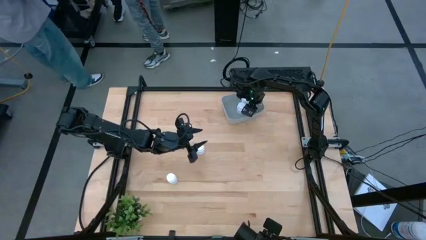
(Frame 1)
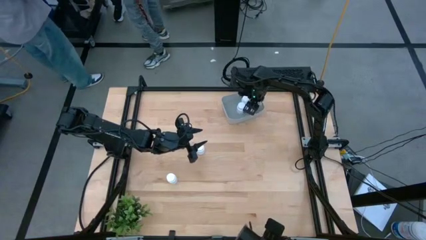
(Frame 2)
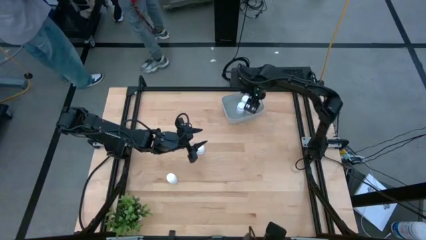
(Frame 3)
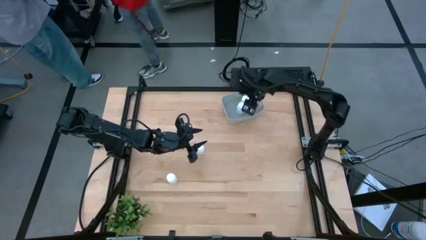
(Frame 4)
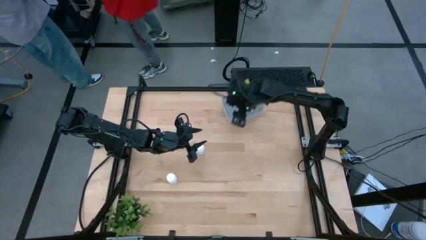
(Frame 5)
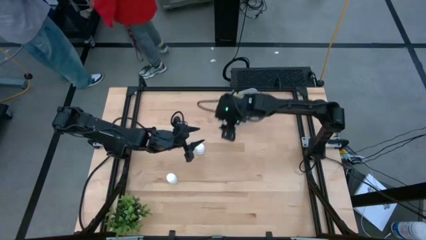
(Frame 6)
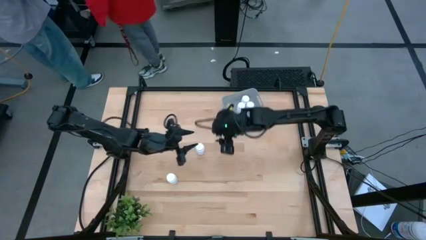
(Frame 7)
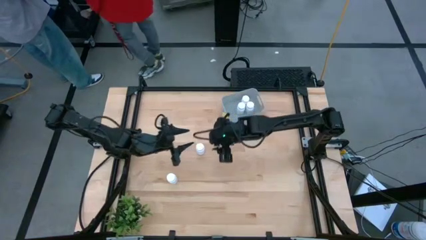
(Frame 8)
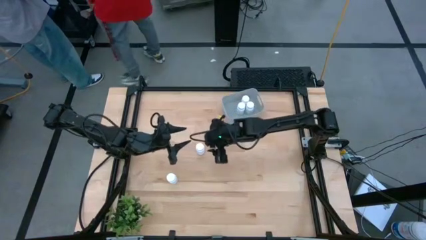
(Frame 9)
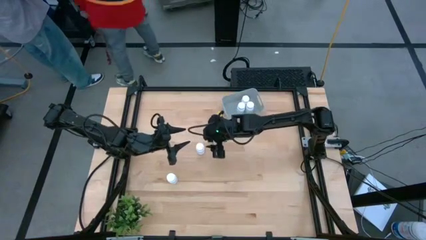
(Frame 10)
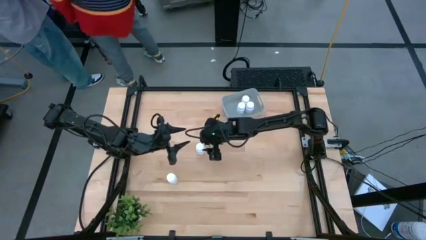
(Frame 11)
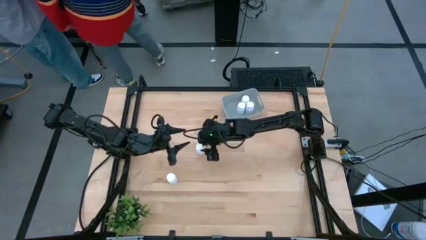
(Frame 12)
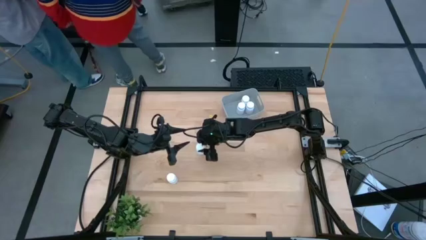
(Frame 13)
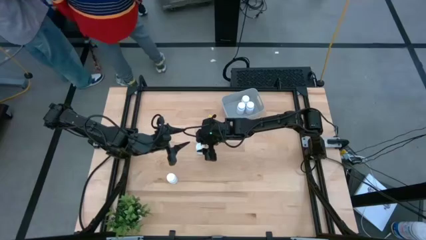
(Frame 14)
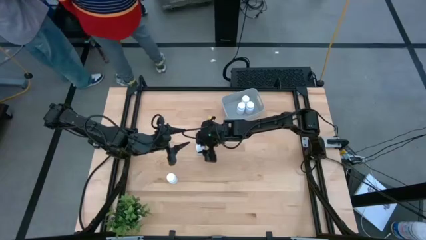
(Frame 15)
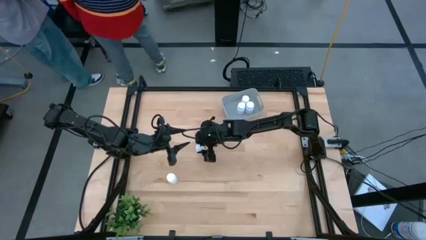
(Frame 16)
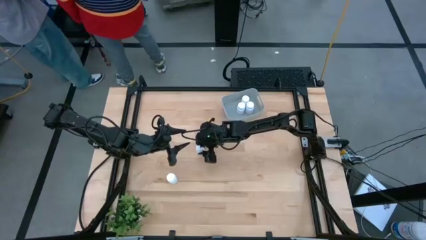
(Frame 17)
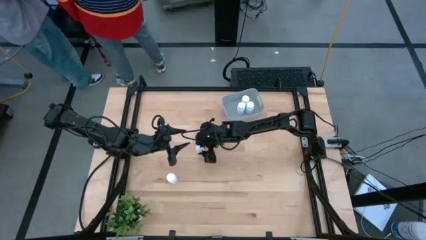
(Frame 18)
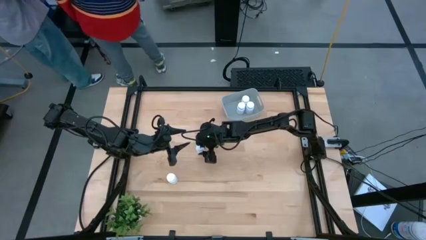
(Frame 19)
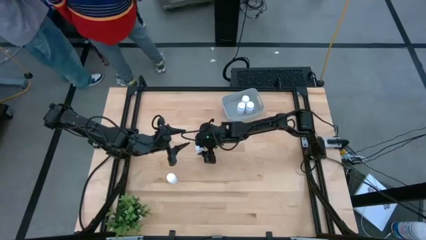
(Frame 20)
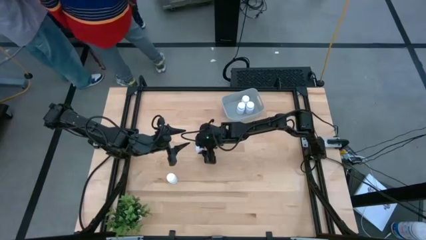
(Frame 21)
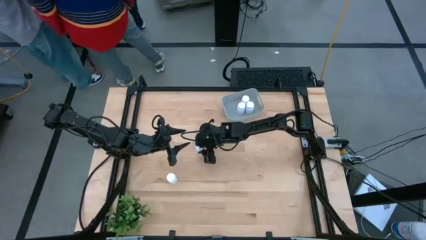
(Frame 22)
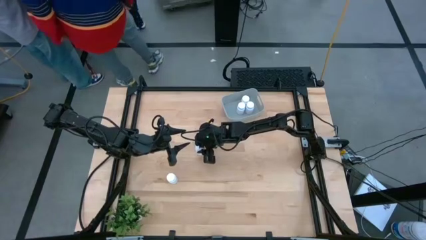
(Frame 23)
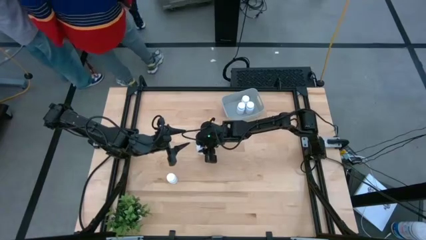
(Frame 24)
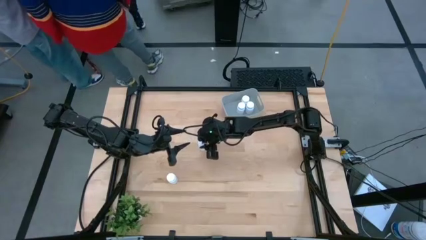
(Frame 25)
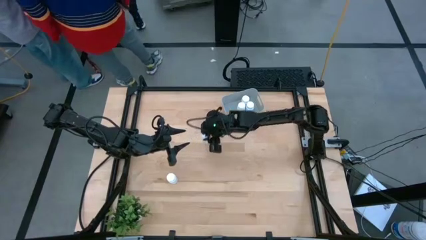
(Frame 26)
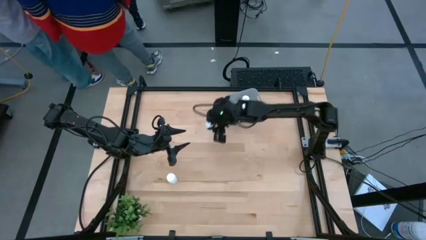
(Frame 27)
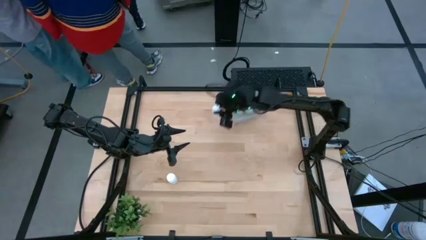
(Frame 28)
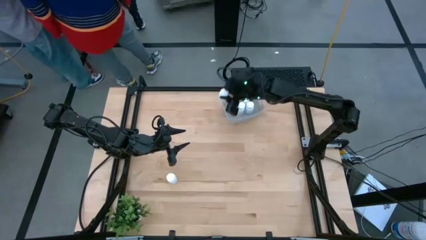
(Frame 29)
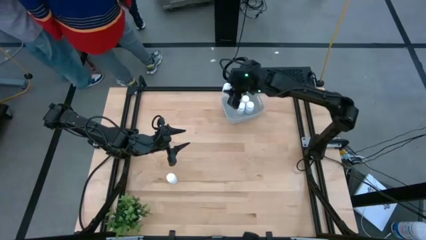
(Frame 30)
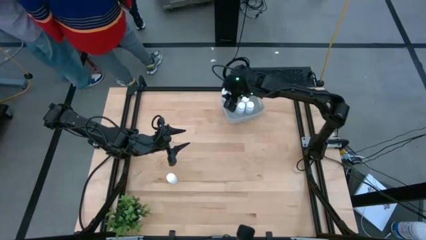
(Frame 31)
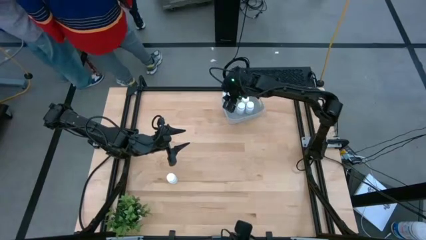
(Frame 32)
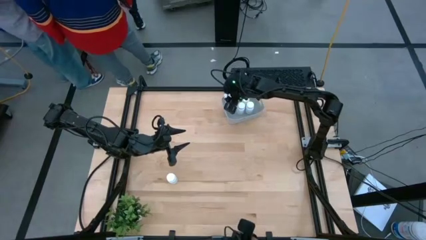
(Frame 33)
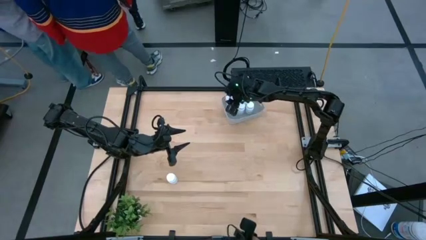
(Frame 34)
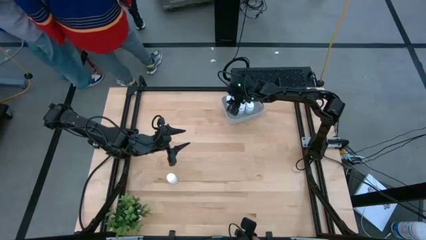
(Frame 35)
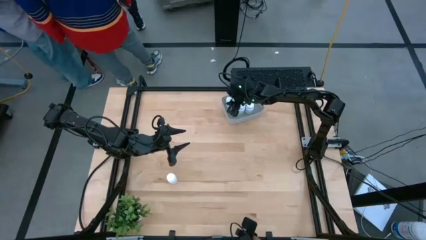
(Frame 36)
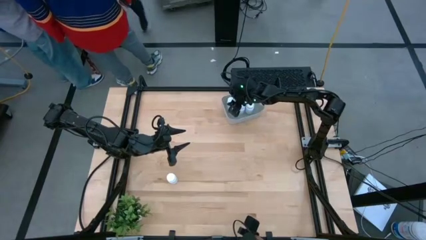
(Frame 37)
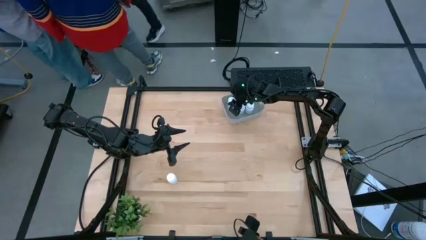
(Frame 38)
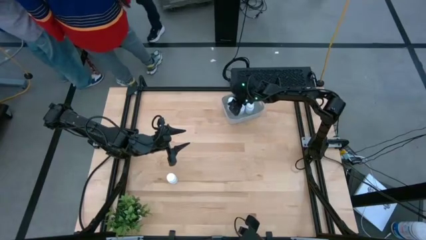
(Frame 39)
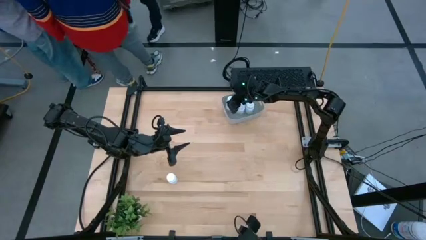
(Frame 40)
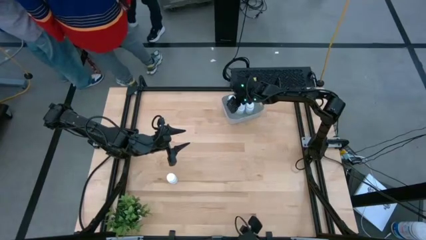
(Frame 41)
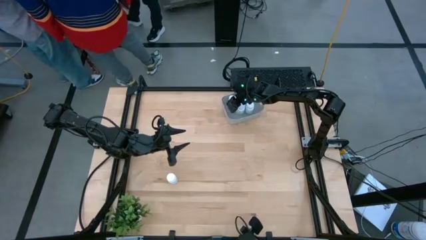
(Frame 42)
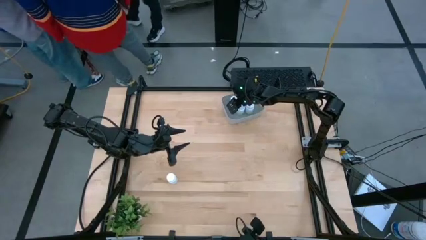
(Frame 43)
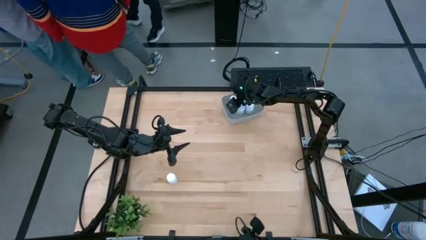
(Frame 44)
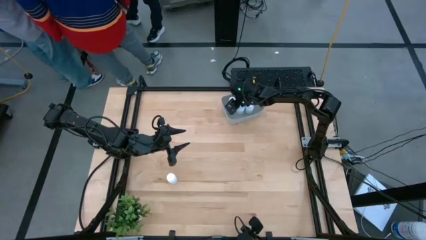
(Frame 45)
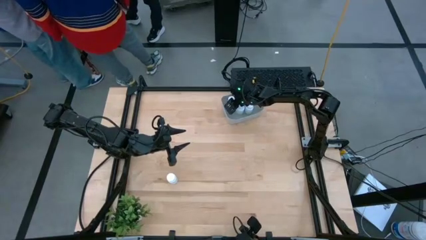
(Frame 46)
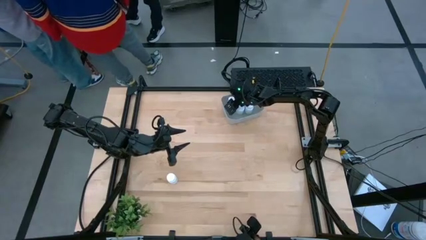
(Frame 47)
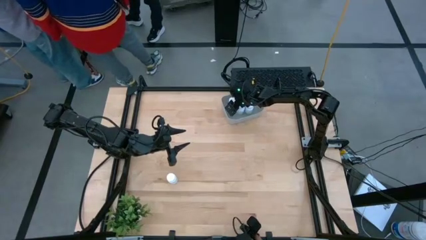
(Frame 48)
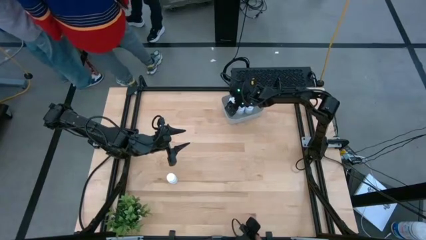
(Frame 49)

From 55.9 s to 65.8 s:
Task: Pick and place pill bottles into a basket
Put the white medicine bottle into the gray bin

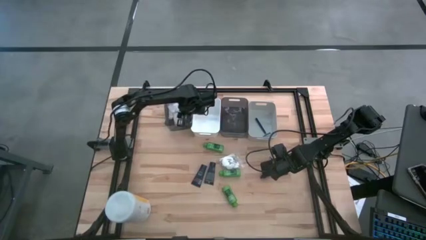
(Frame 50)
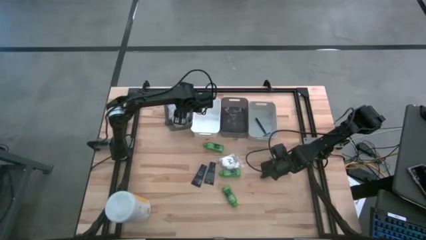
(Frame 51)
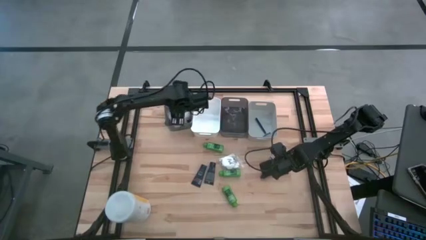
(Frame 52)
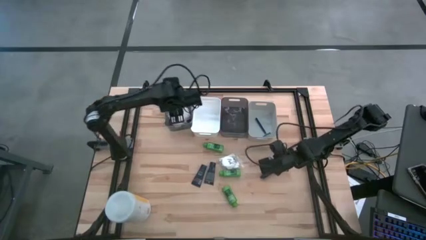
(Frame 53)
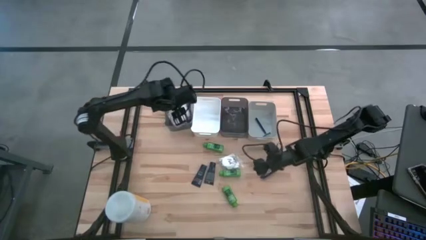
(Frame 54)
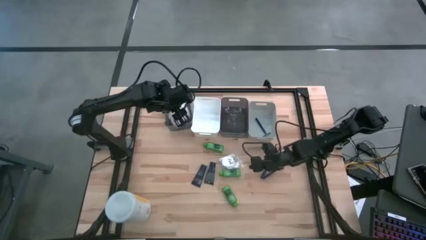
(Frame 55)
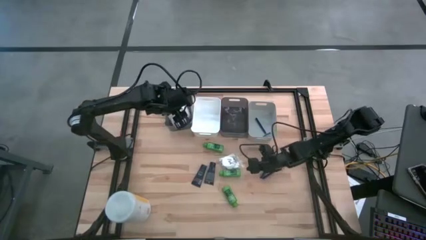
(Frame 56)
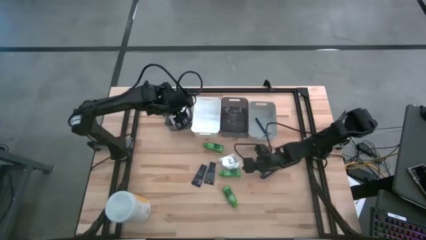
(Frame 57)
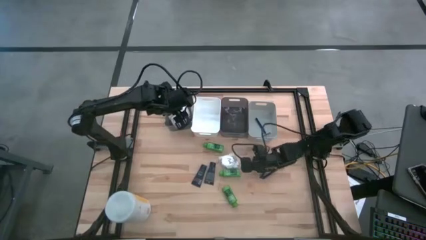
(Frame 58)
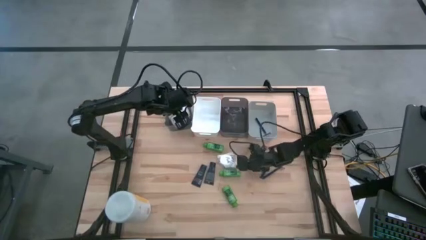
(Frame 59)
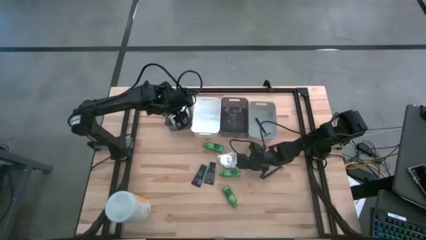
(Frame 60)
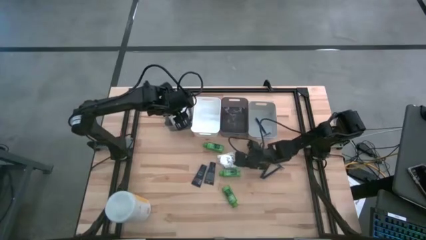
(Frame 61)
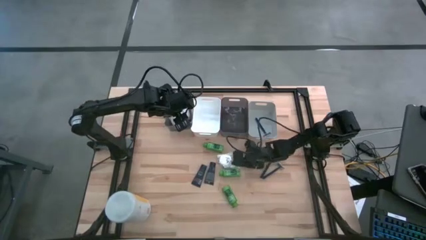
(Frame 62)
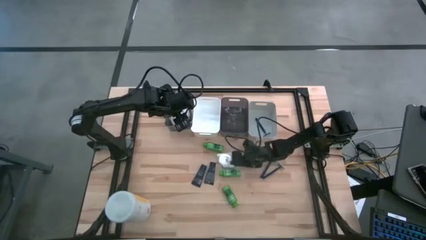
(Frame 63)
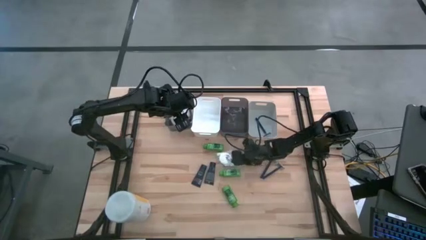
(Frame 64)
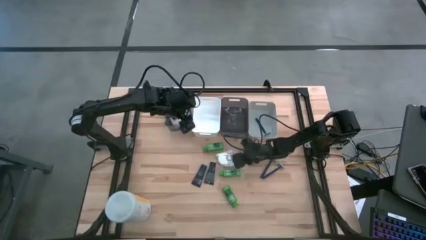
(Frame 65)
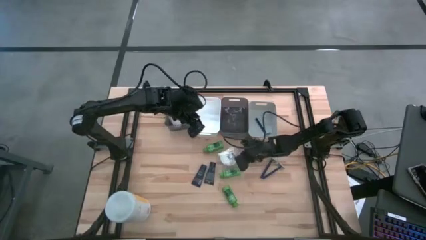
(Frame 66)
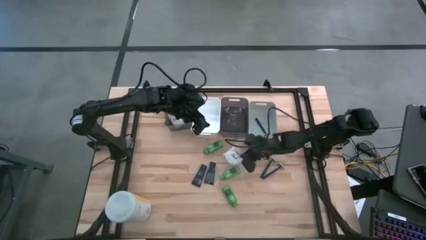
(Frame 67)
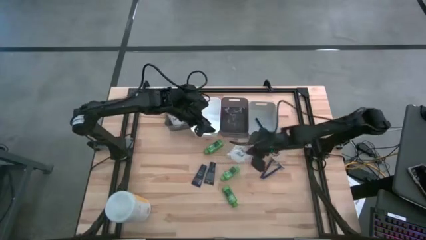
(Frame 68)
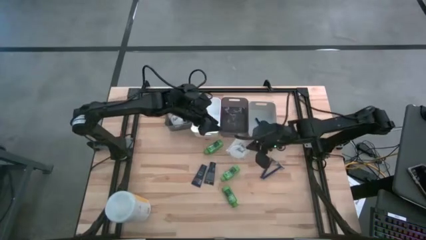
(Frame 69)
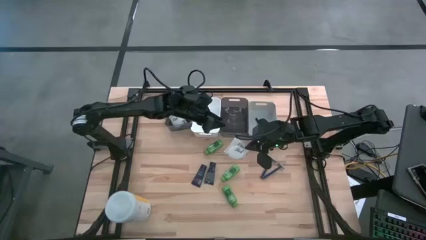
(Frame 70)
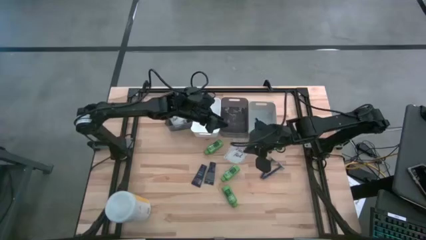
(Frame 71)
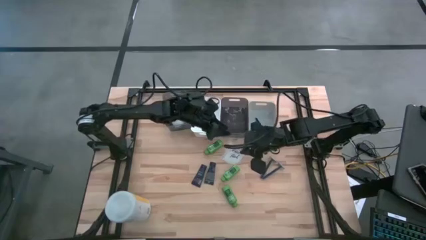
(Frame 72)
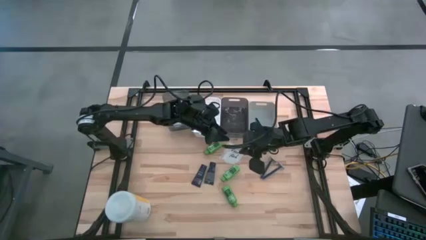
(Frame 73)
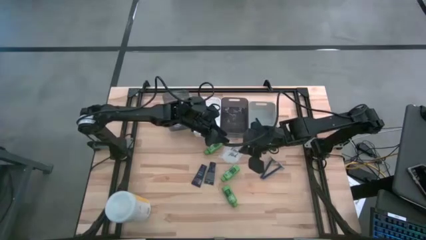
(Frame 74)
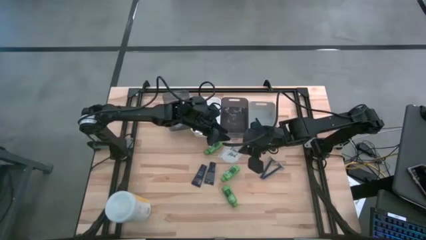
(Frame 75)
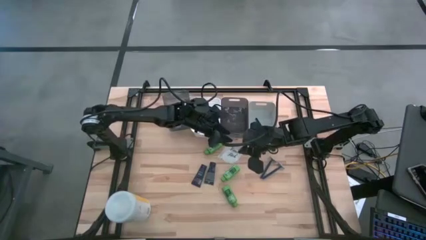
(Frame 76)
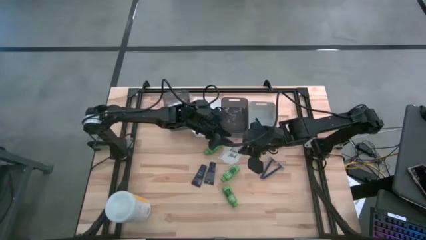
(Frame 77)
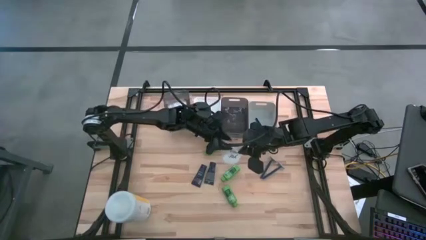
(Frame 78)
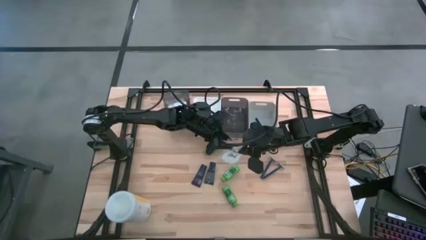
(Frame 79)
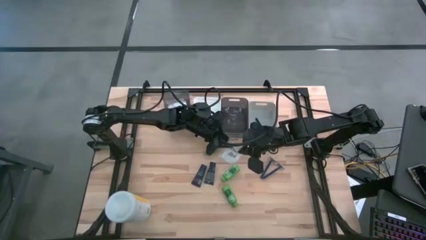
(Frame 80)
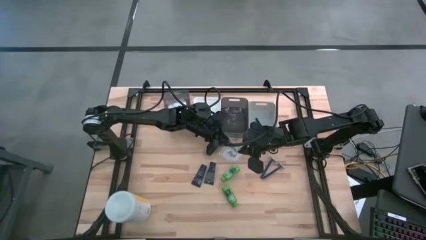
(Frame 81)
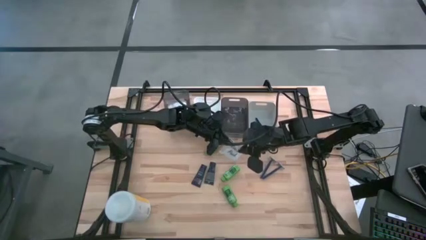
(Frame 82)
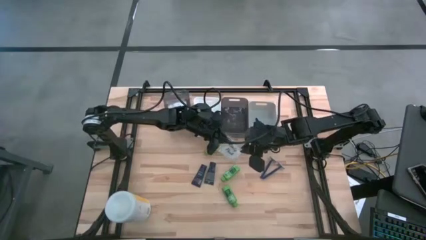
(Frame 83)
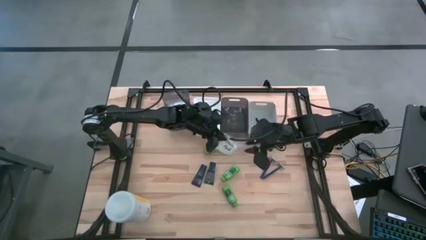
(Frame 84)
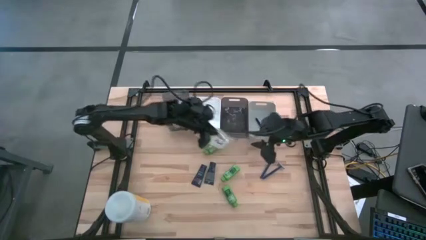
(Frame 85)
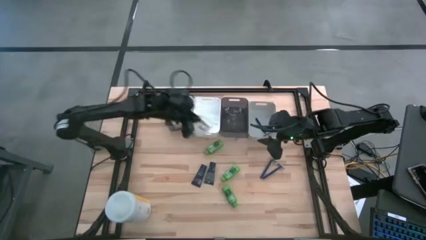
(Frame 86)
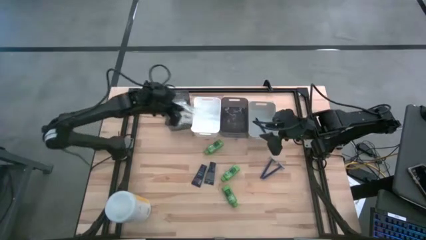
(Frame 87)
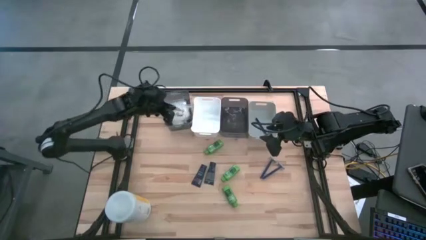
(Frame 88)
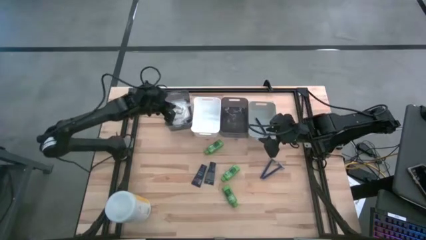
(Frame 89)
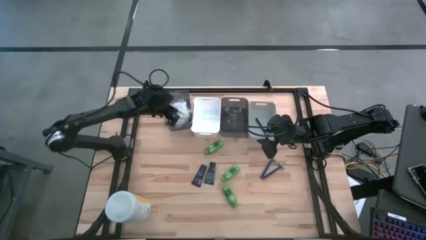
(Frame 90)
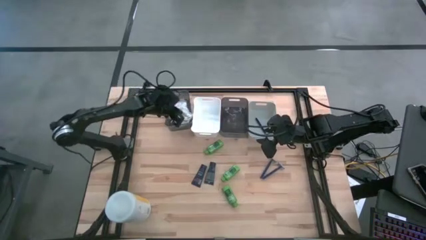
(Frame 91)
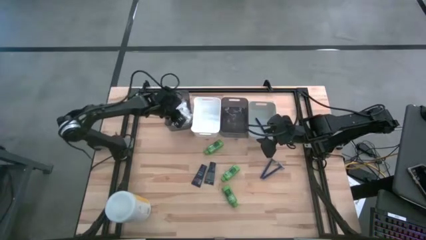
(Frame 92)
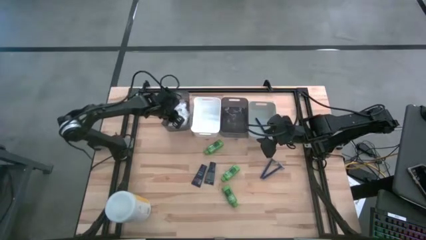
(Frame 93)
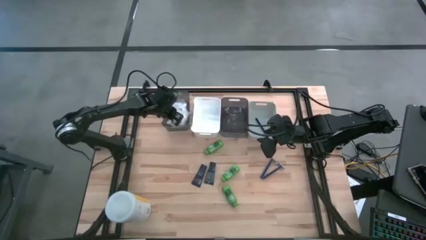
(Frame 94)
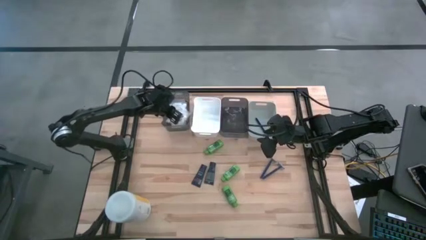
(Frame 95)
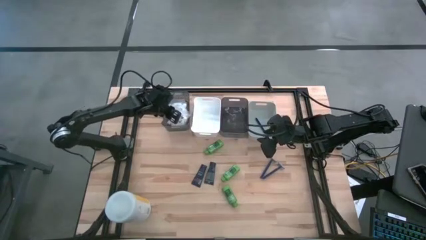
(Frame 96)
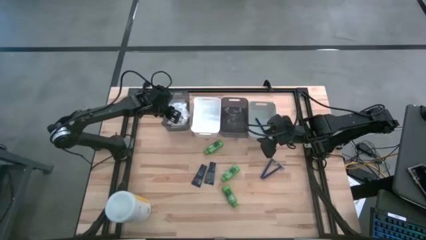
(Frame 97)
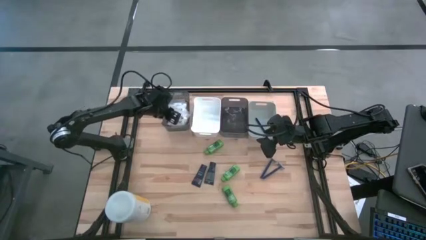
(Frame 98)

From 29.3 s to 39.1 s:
Task: Pick & Place Travel size toiletries
Put the cotton pack into the left black bin
